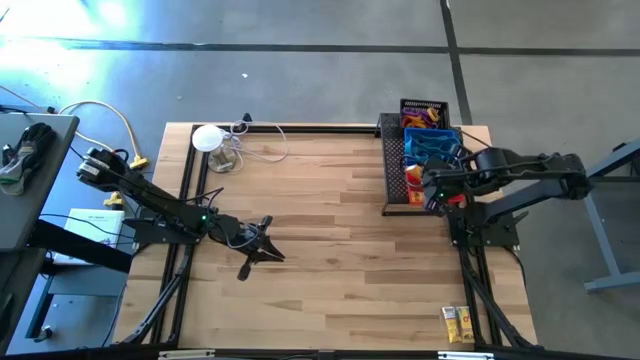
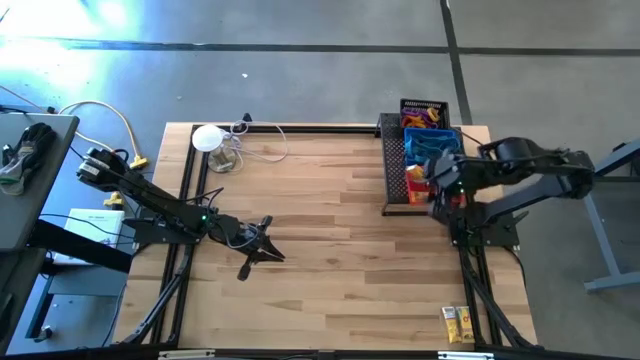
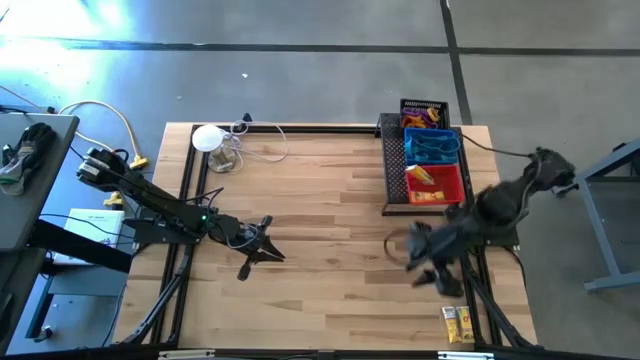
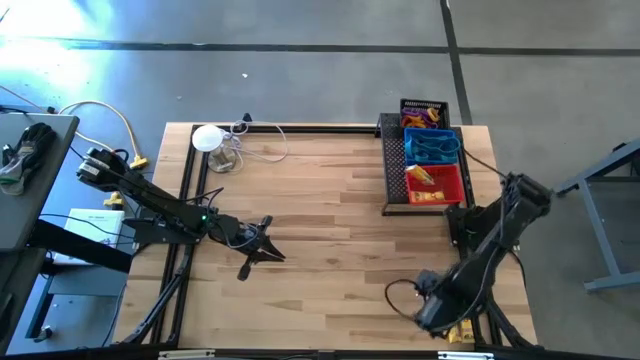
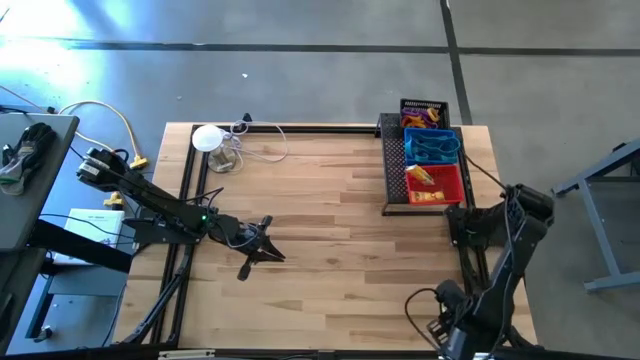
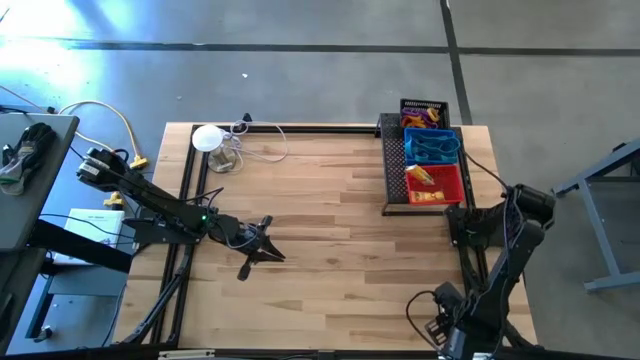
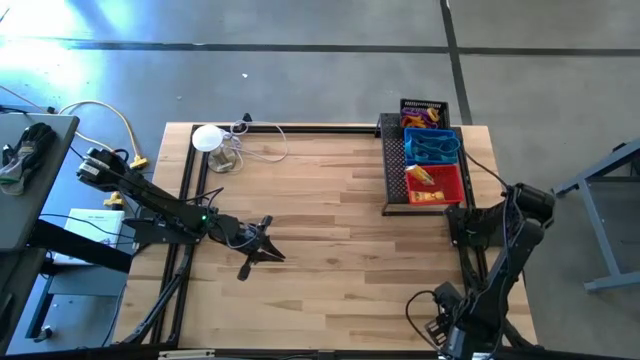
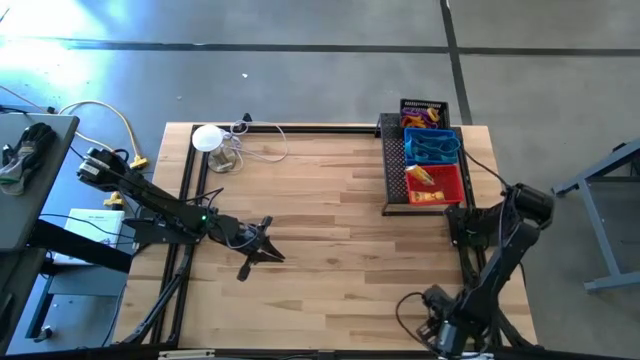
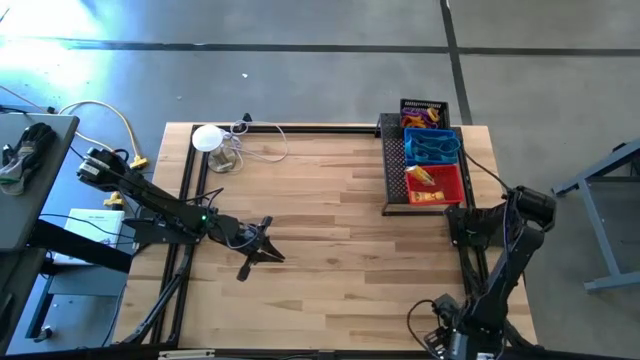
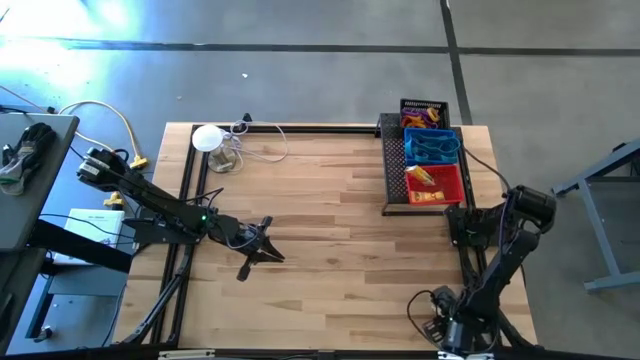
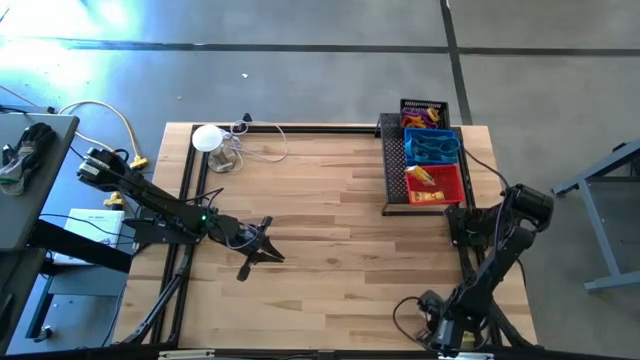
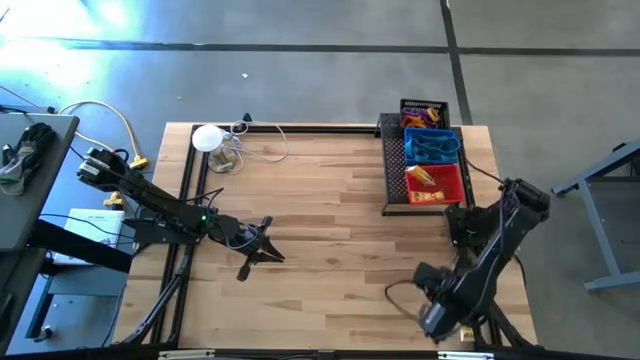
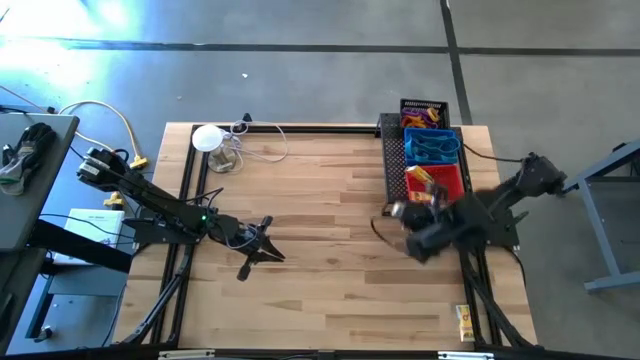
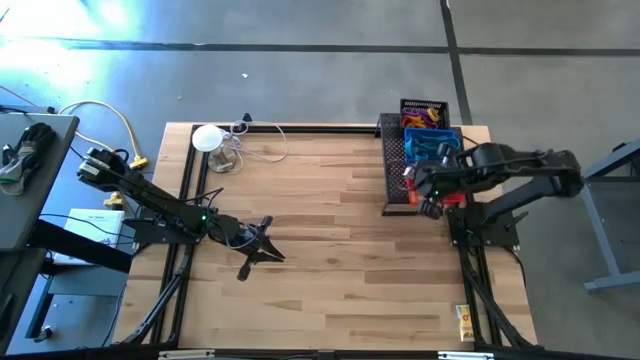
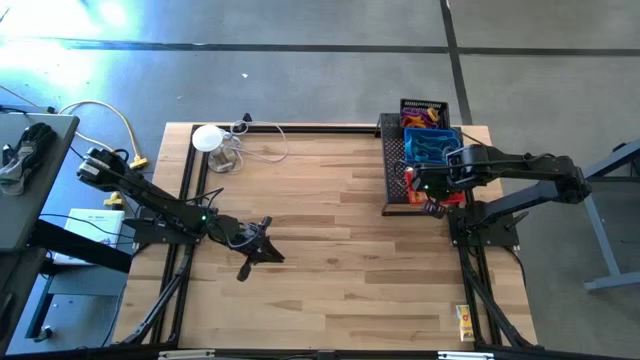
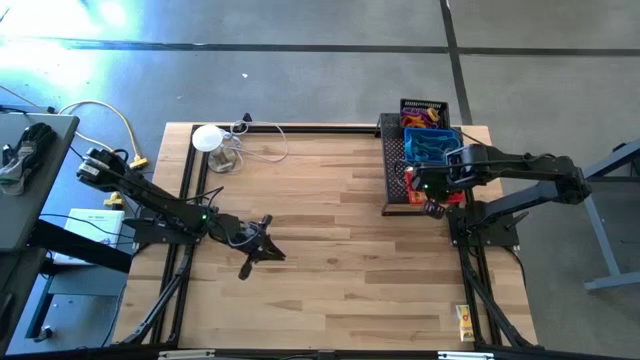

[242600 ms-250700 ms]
Task: Pick & Place Office Desk Supplies
Put the crayon box into the red bin on the shelf

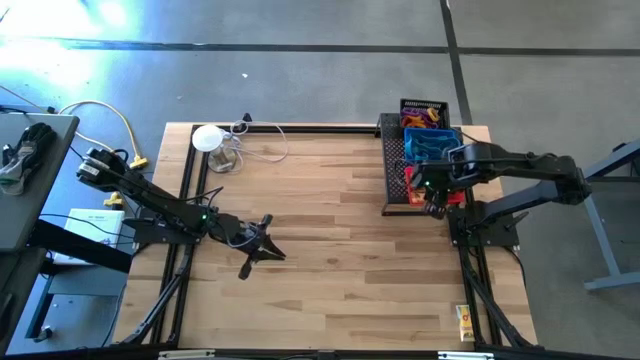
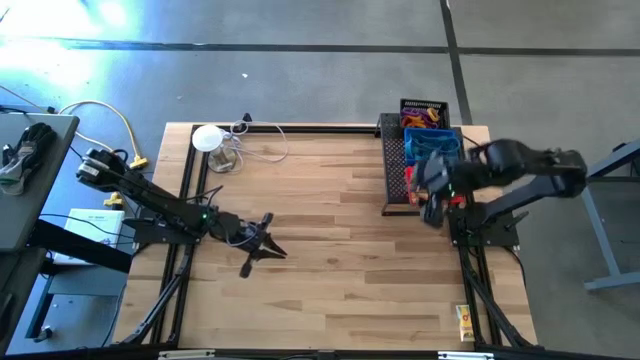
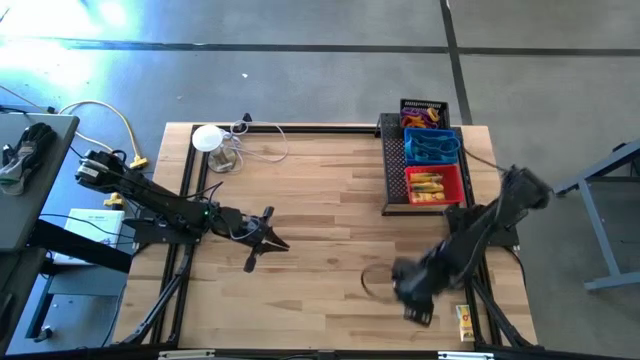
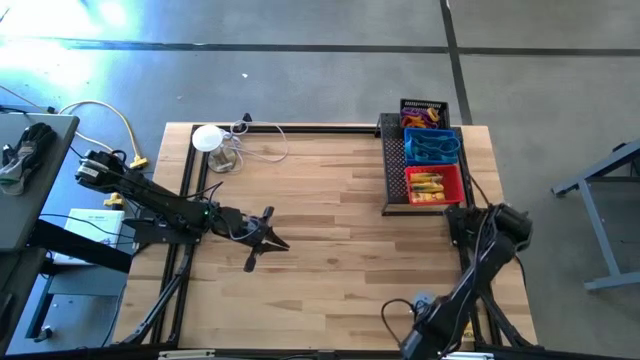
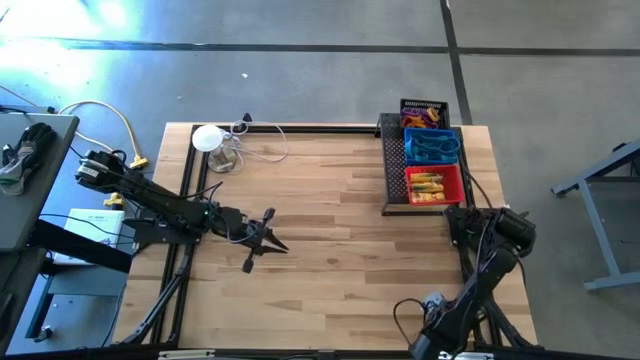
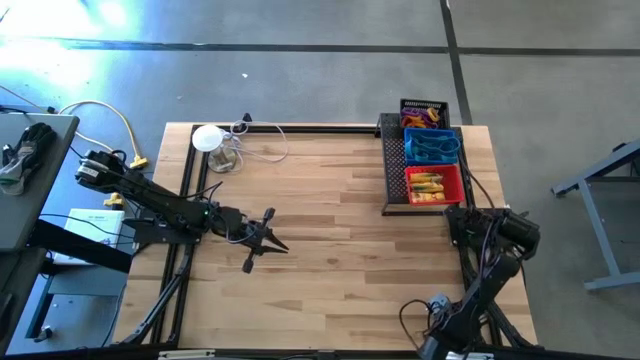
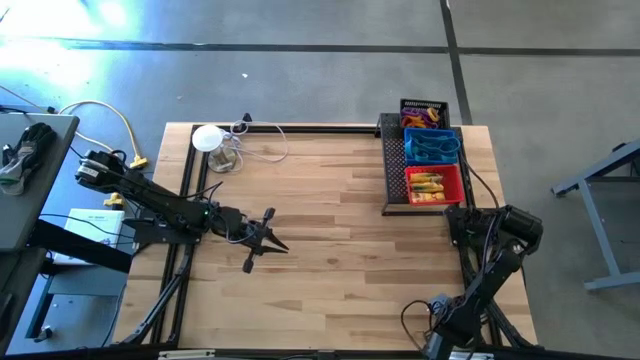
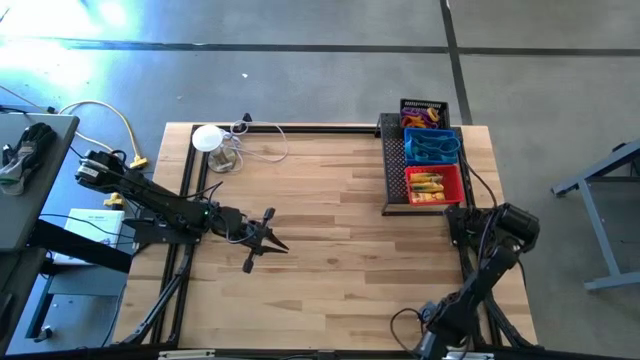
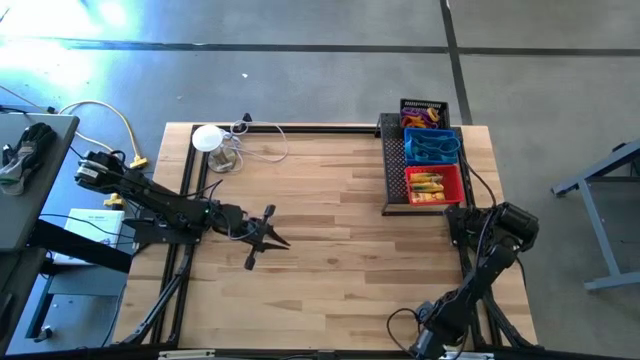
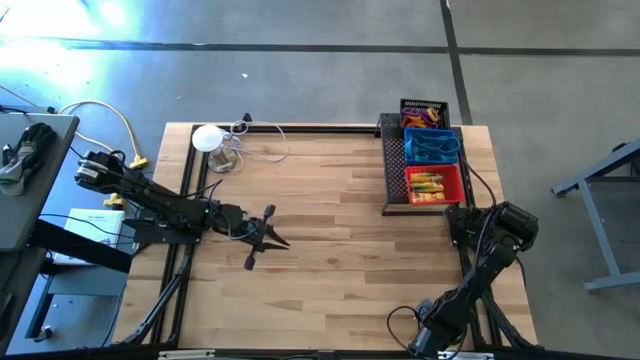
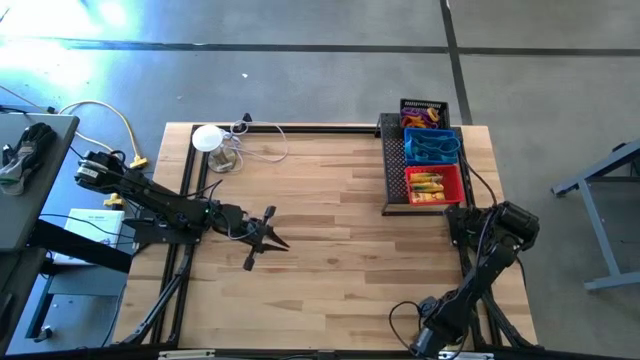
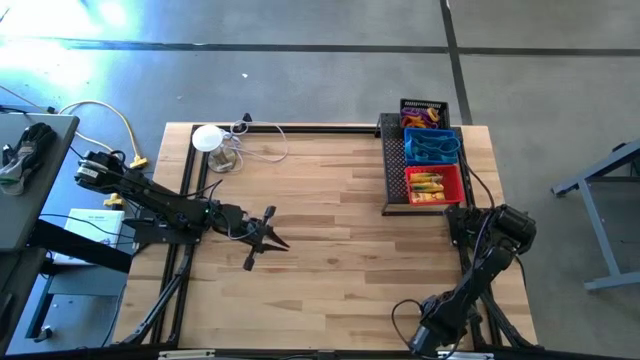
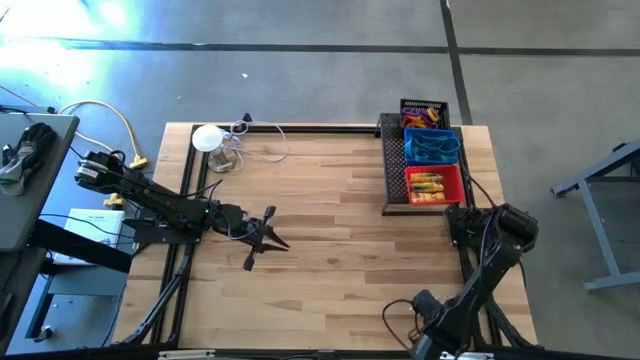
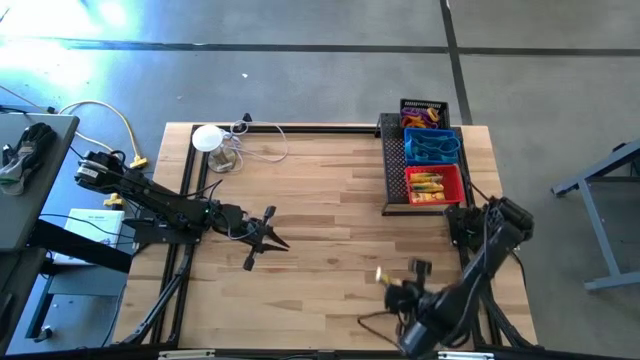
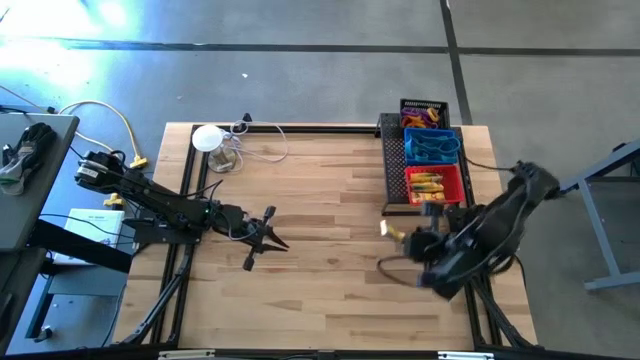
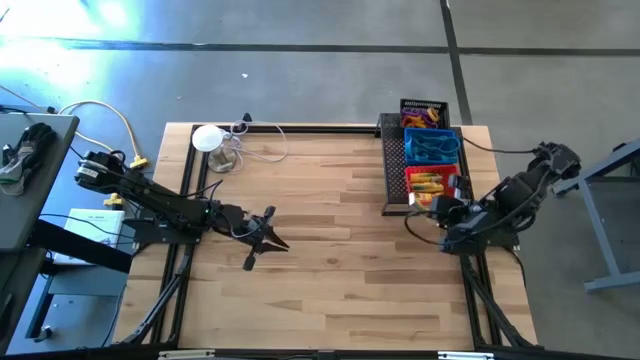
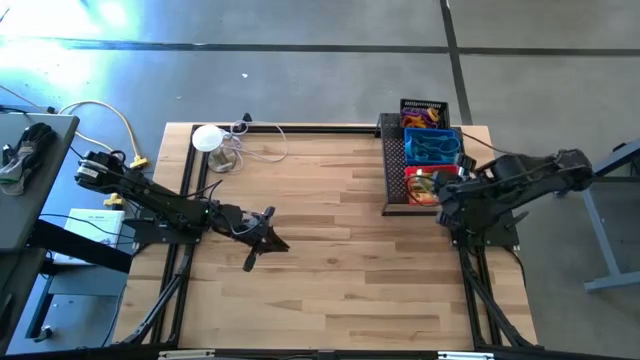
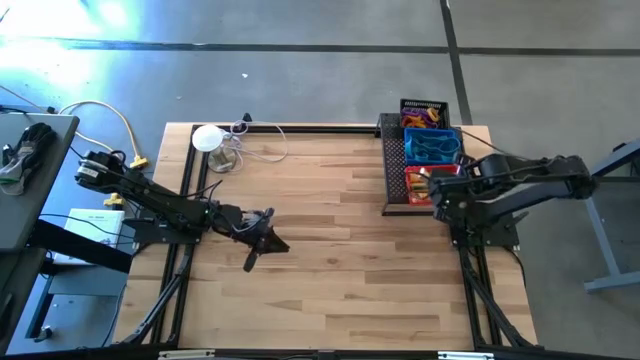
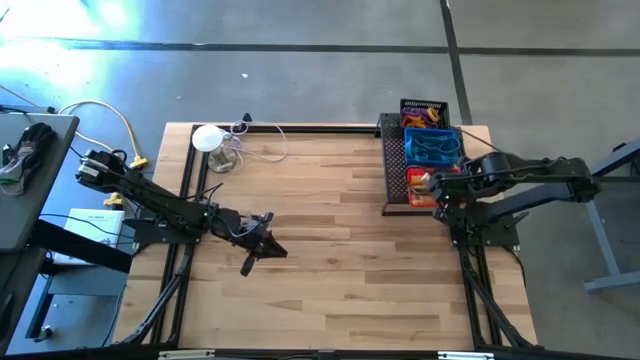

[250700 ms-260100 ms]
Put the crayon box into the red bin on the shelf

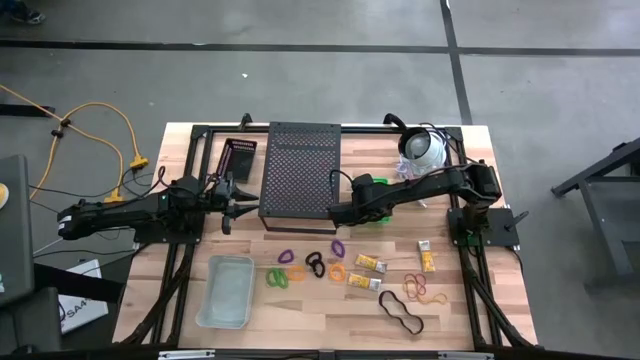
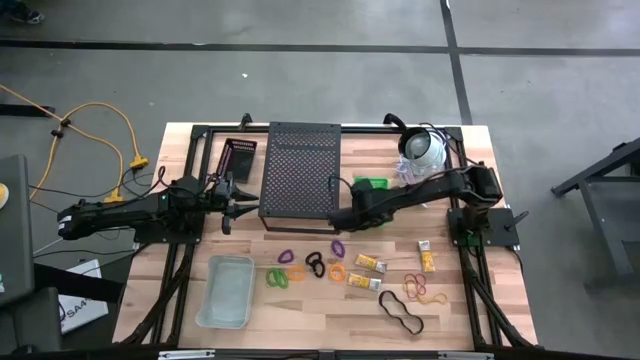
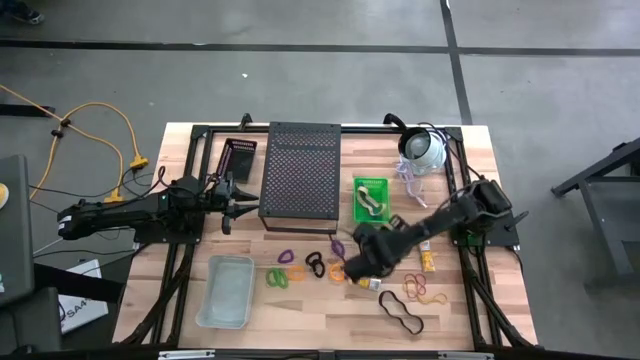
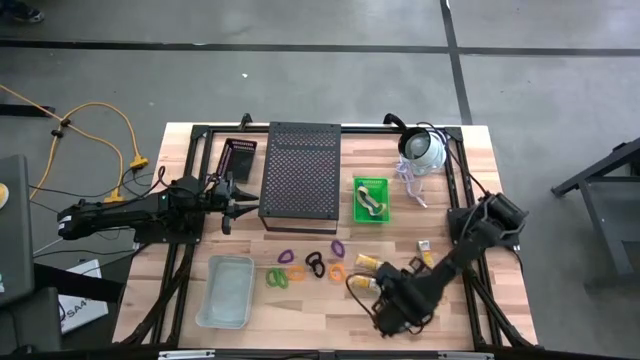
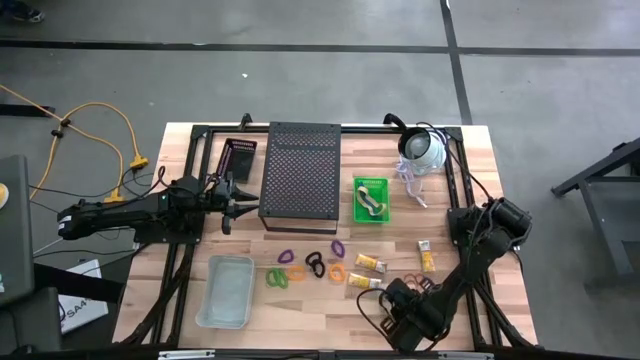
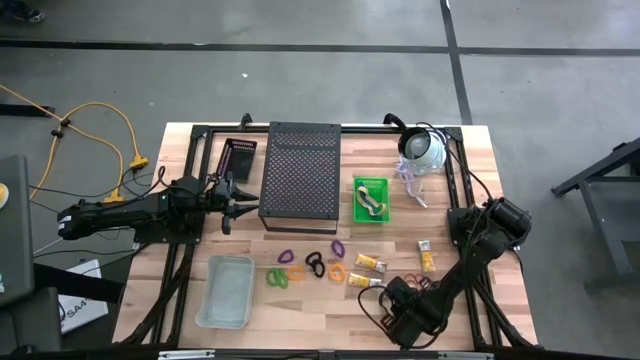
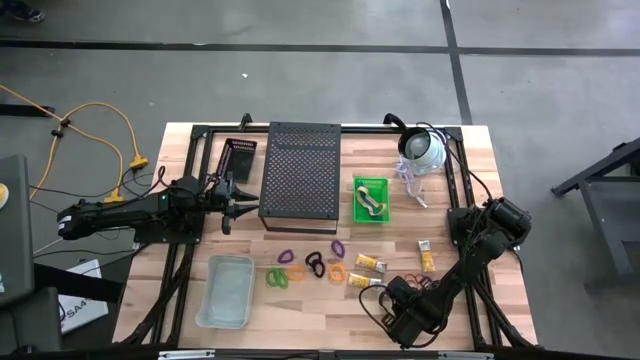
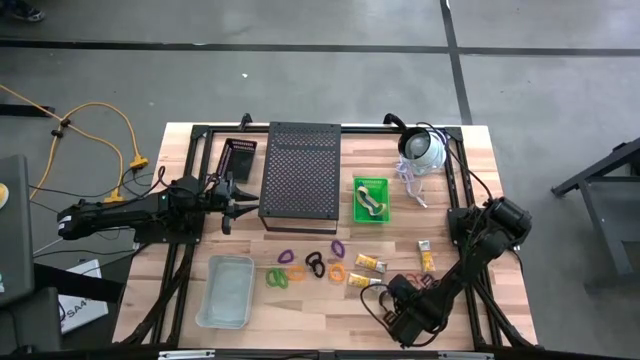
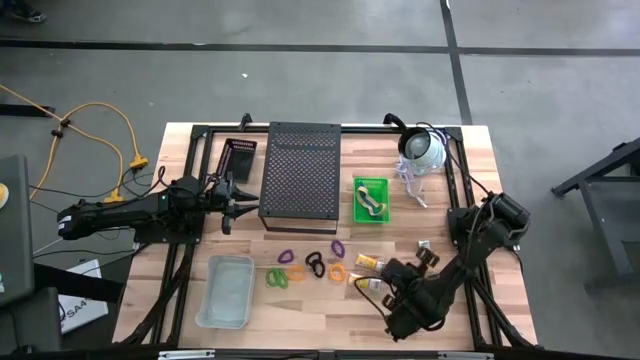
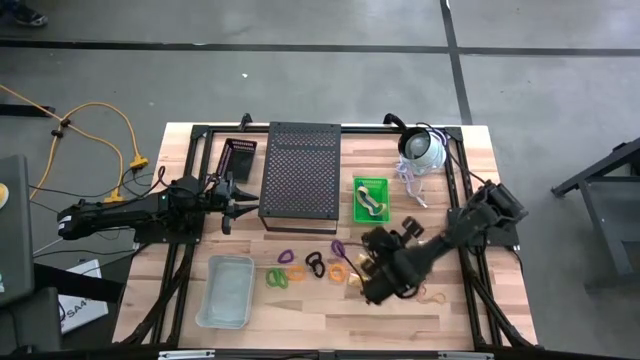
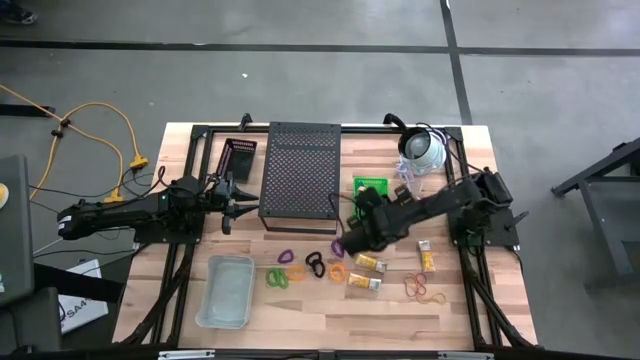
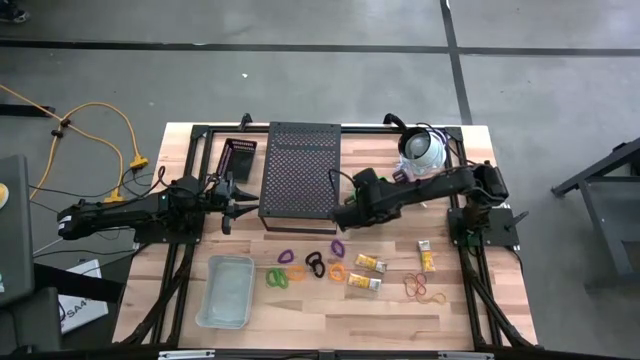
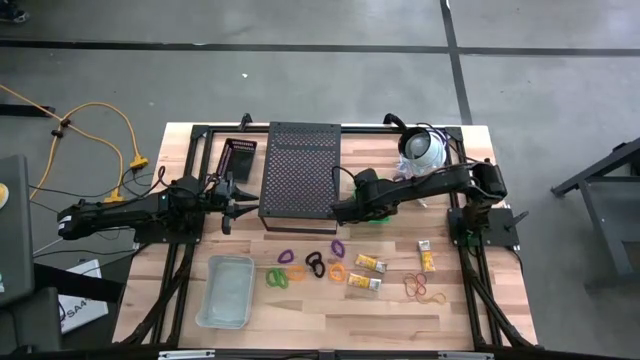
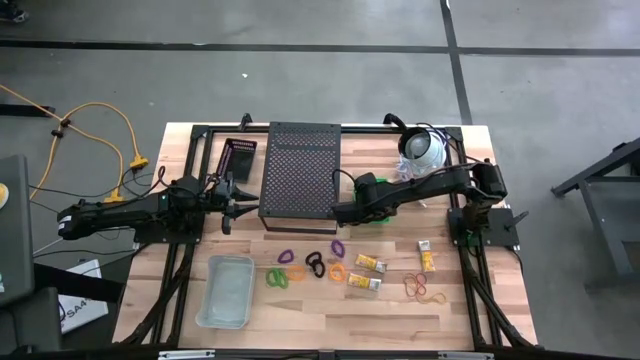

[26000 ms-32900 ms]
Task: Pick & Place Office Desk Supplies
Put the black rubber band into the green basket
